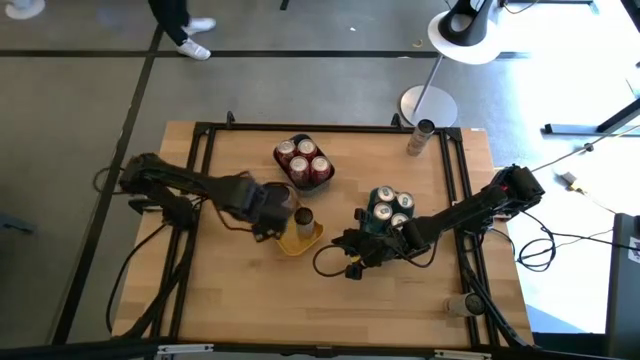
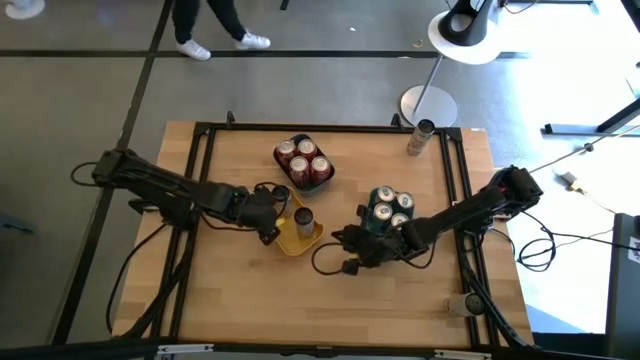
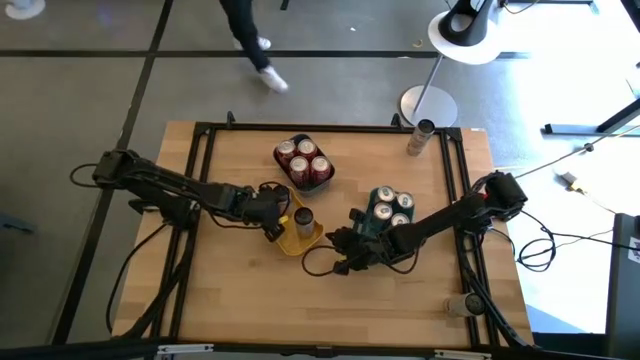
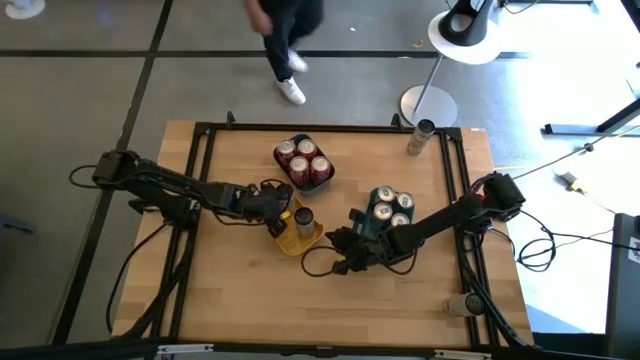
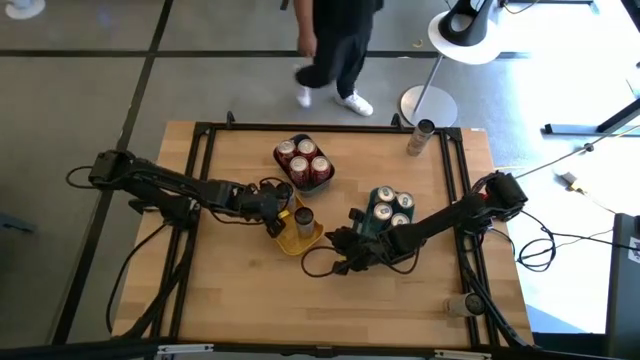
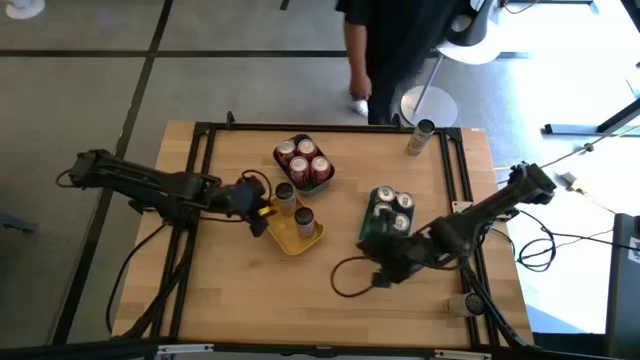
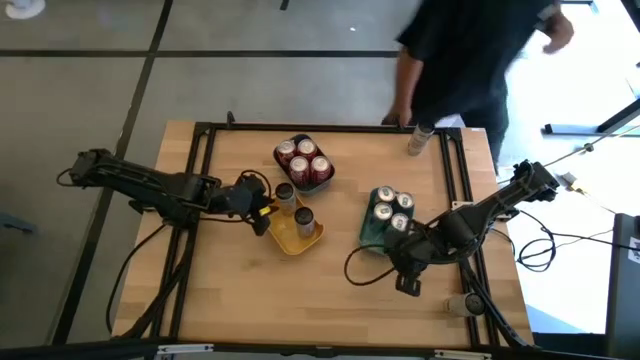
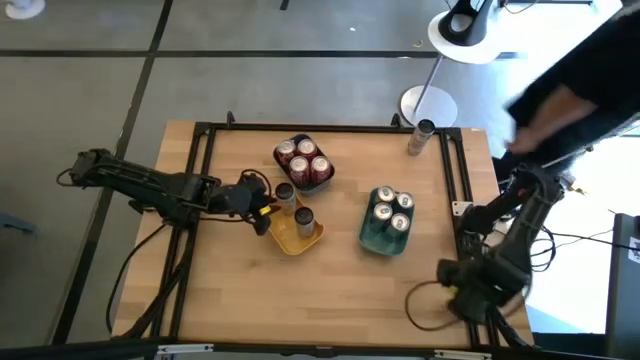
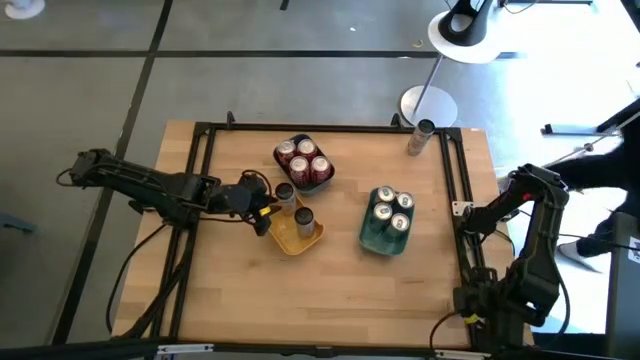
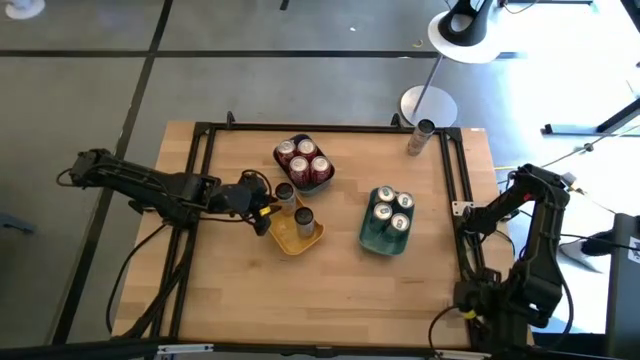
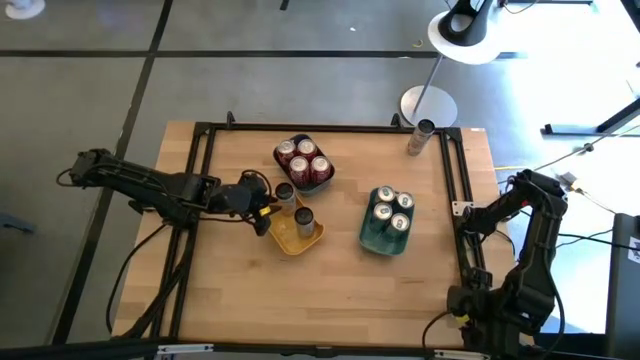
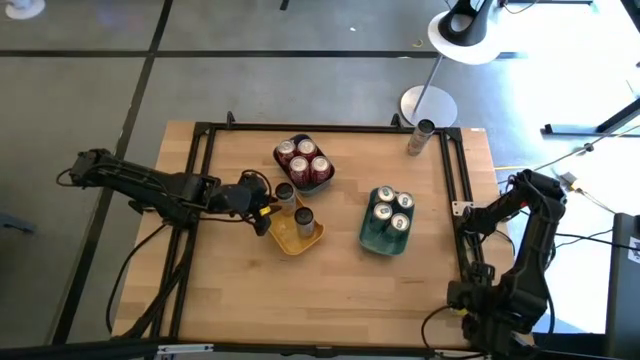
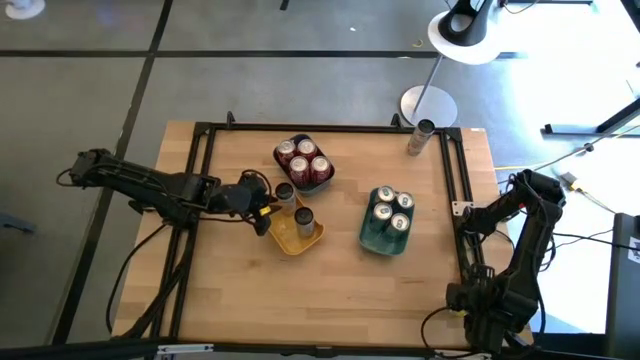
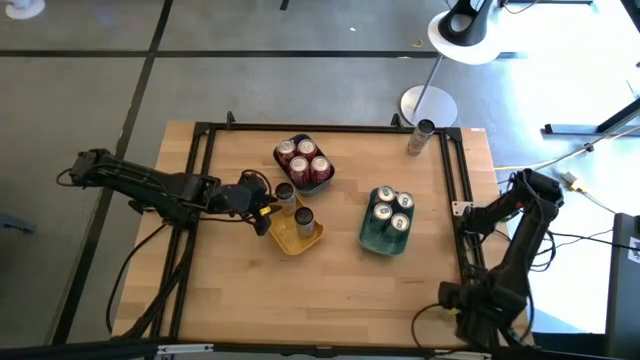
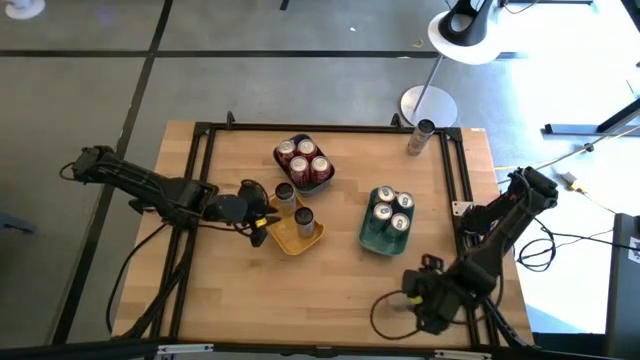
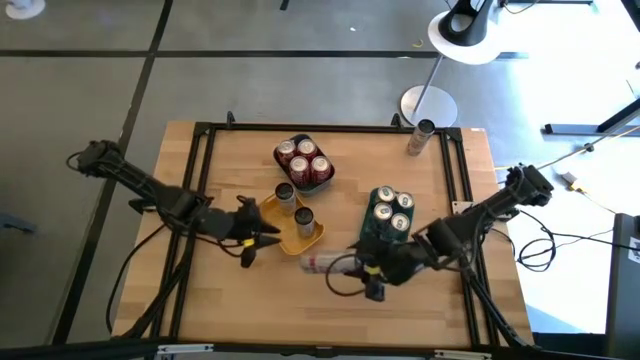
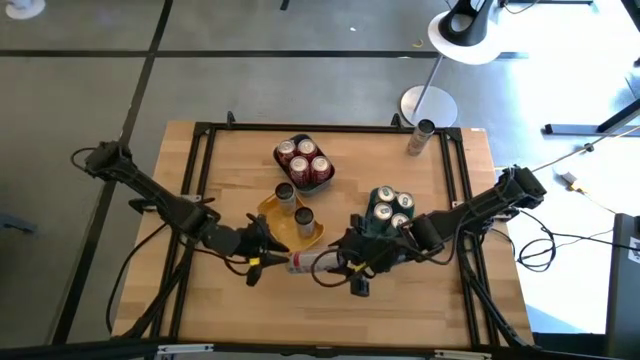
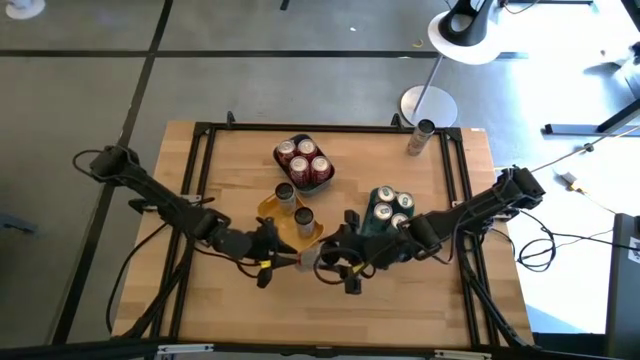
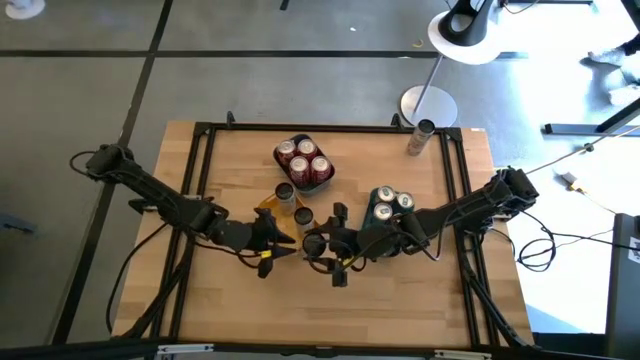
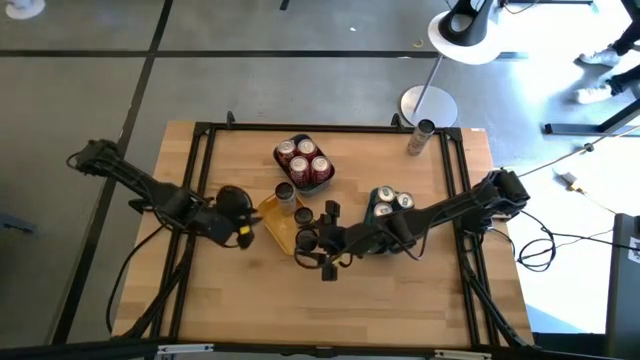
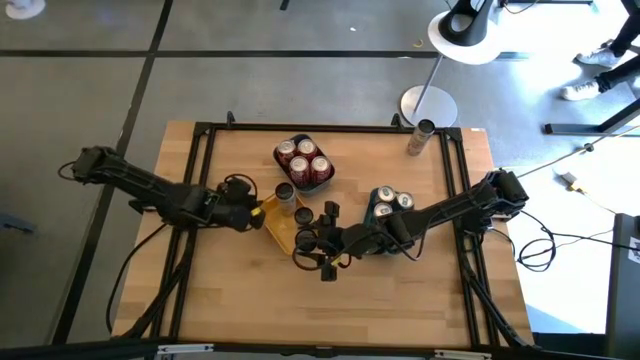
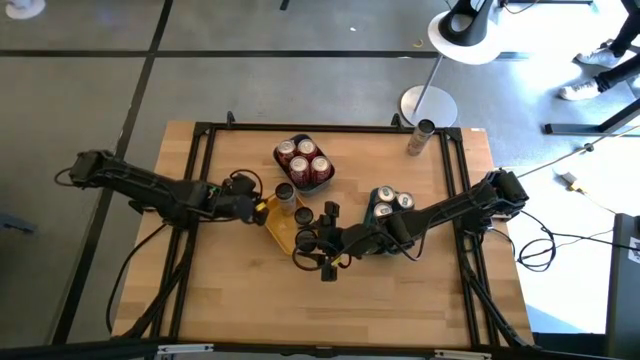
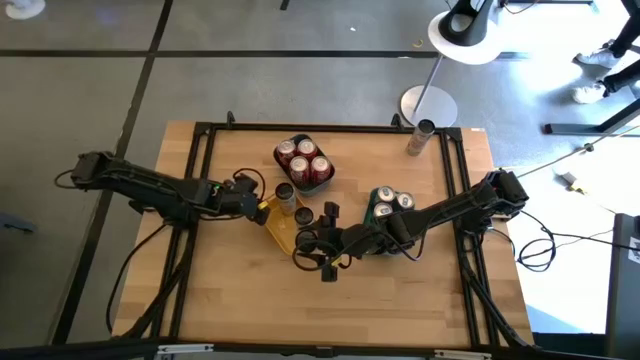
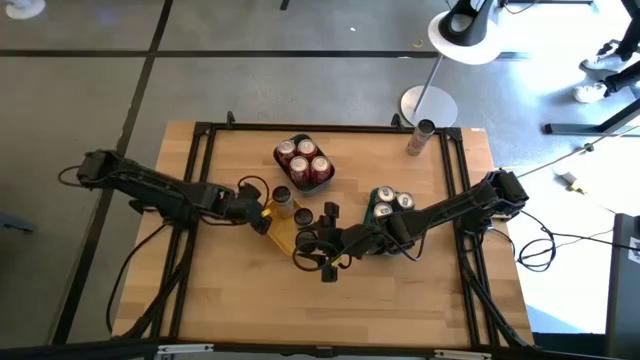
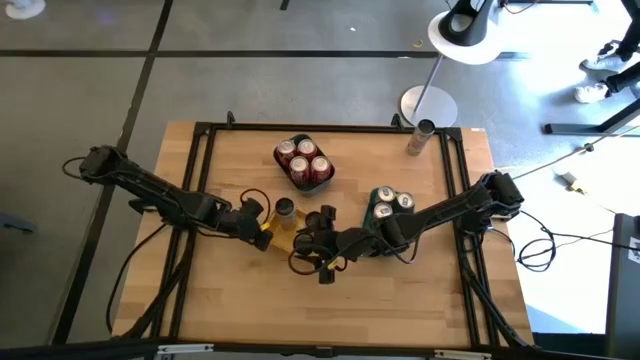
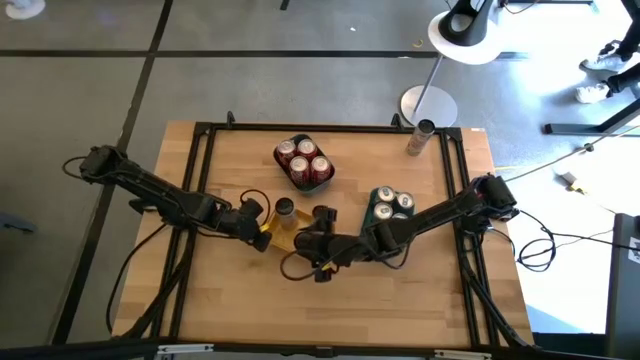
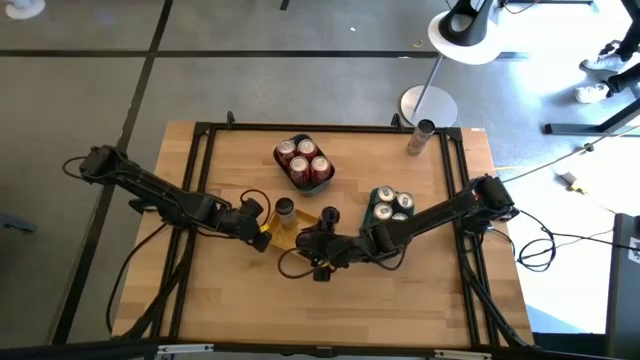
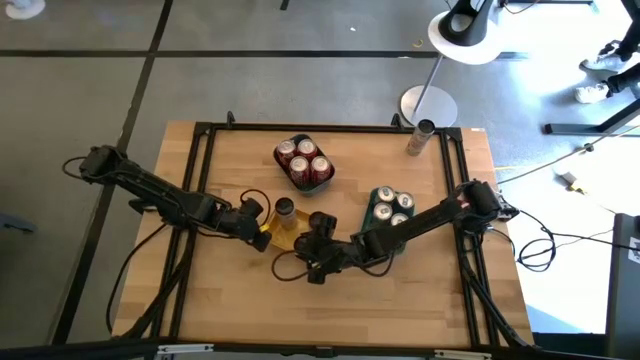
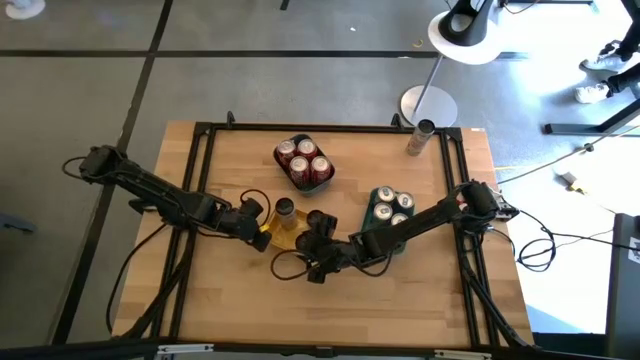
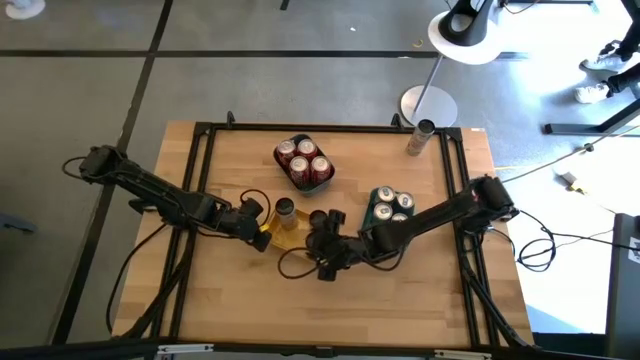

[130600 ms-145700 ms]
Task: Sort soda cans
Put the white and pink soda can into the yellow bin

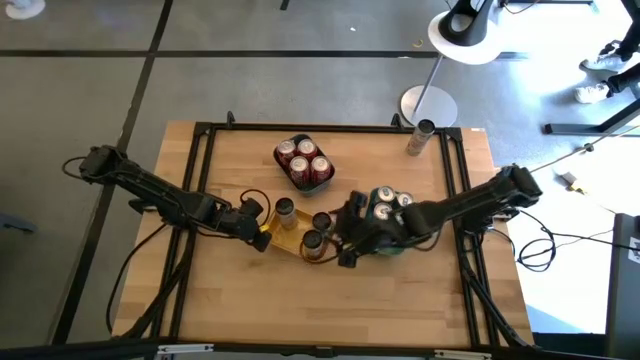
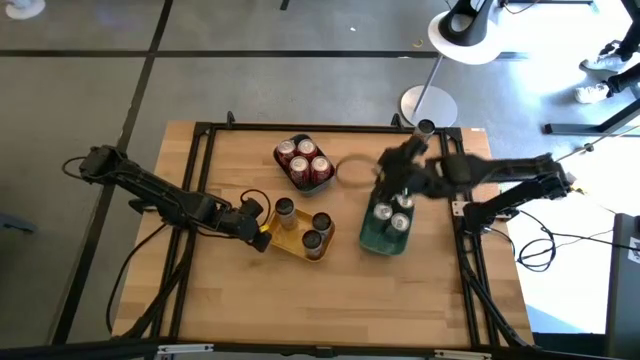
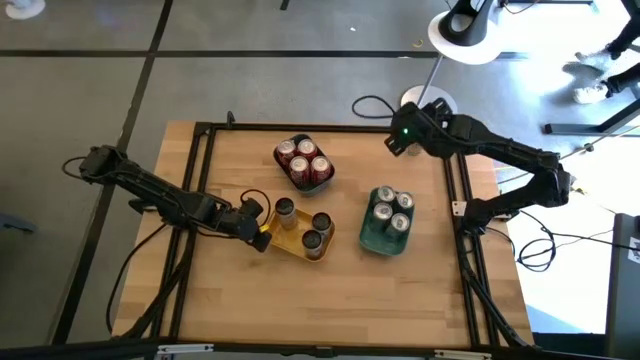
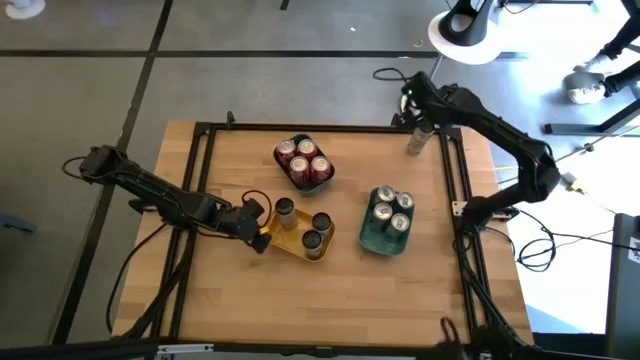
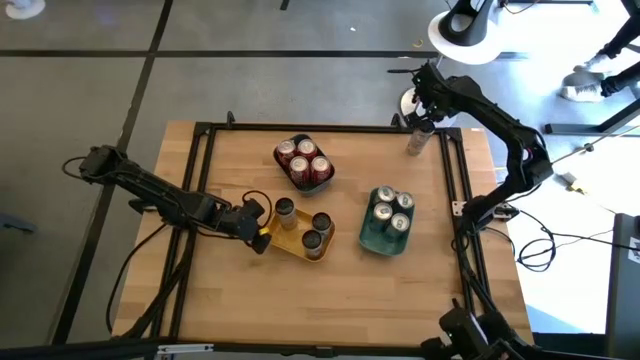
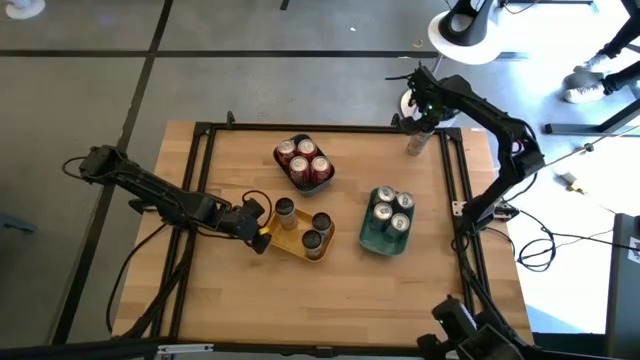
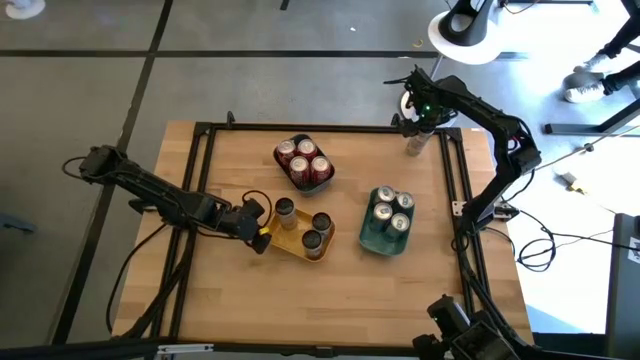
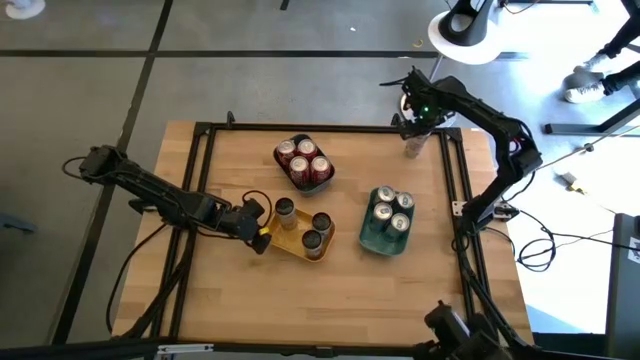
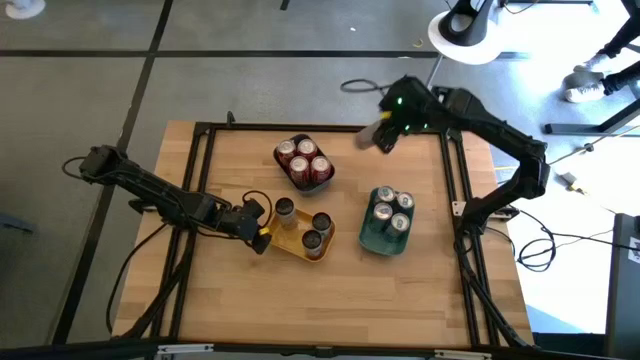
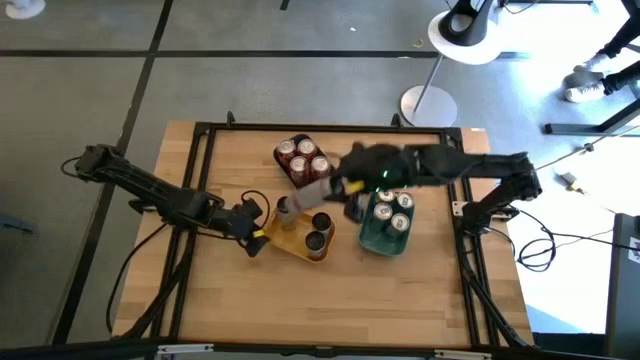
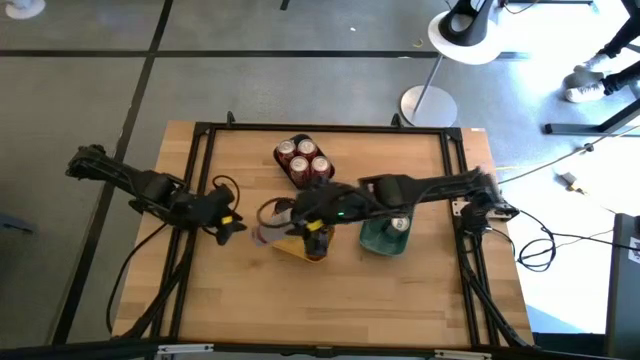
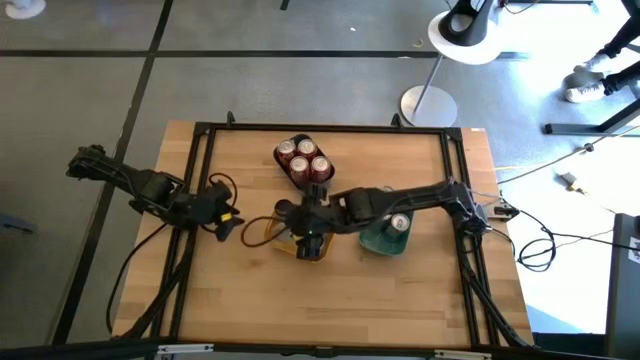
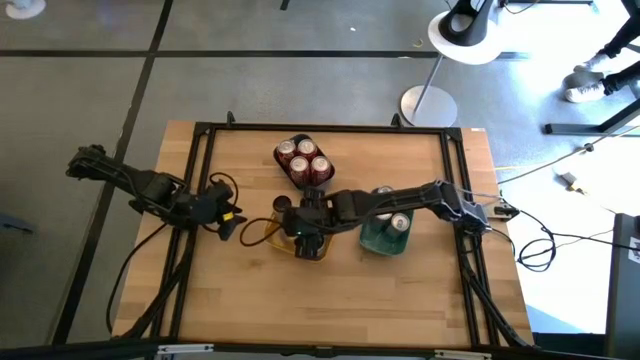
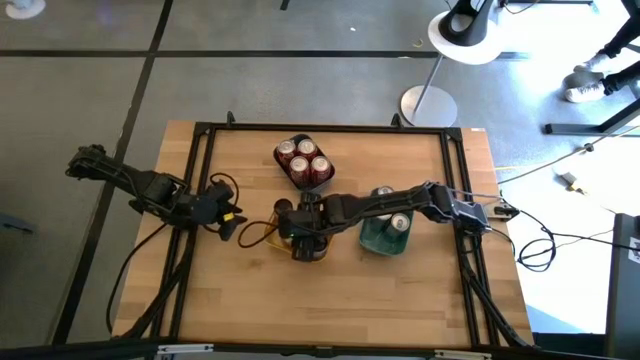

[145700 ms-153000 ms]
Put the white and pink soda can into the yellow bin
